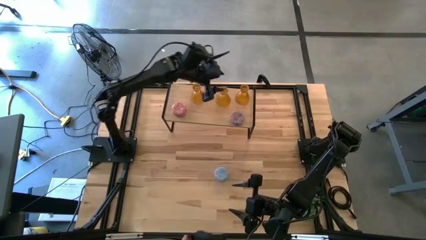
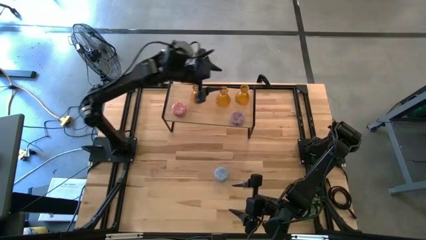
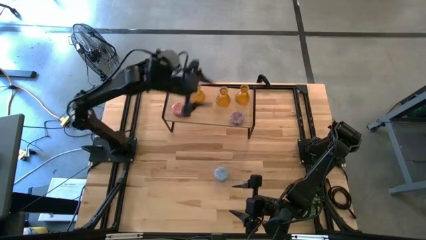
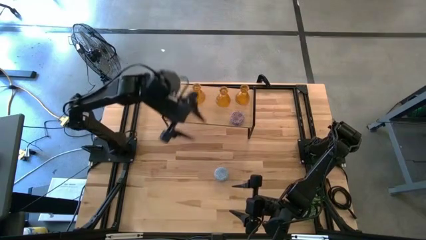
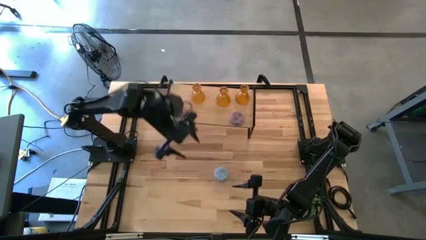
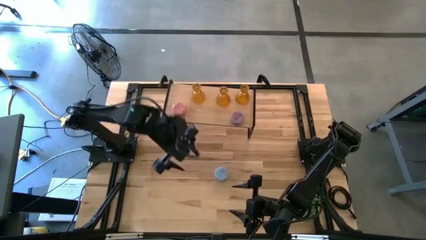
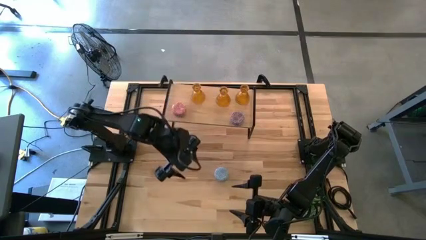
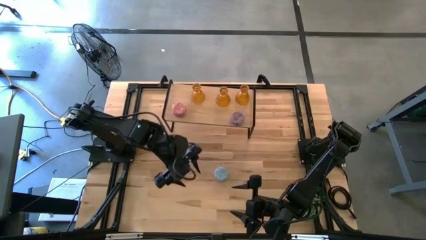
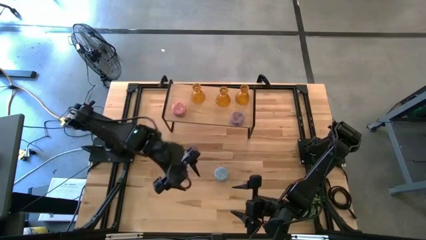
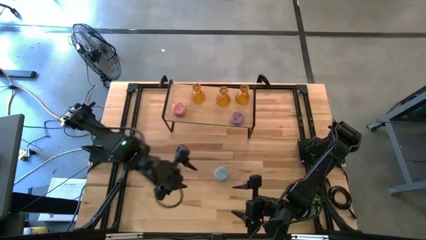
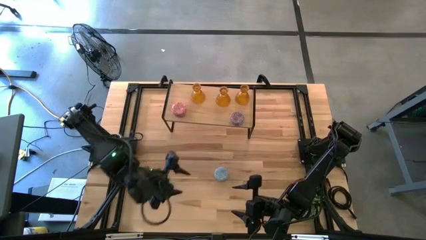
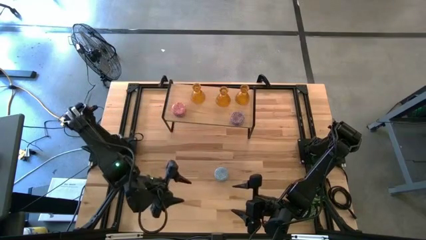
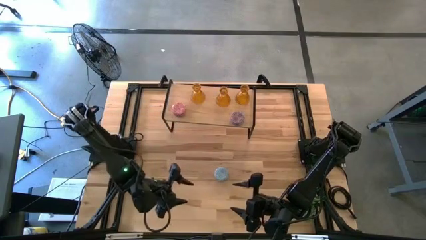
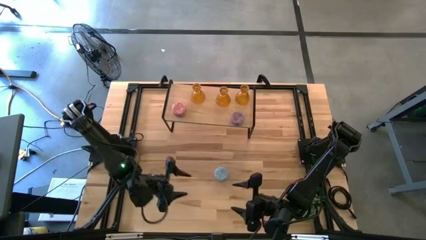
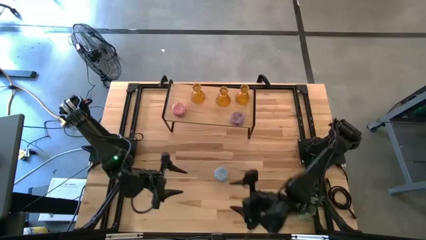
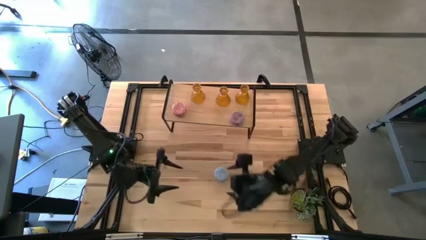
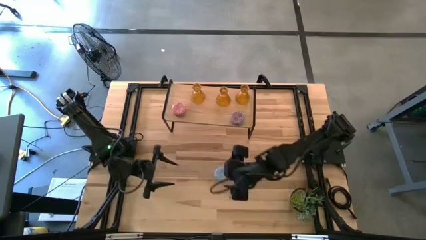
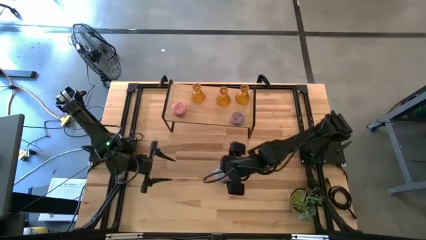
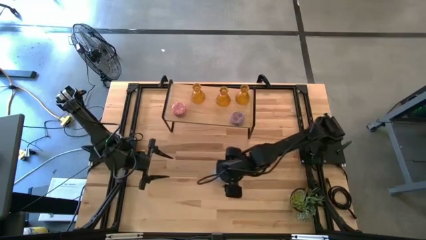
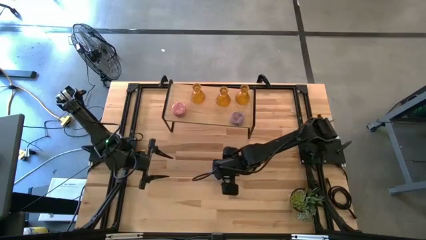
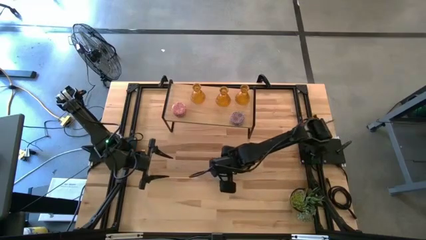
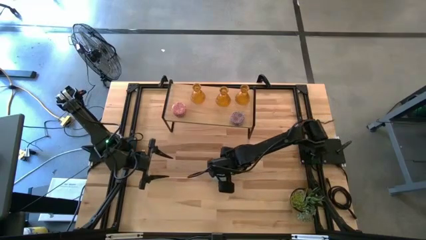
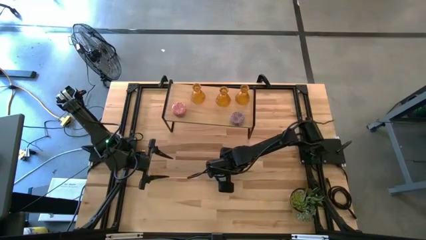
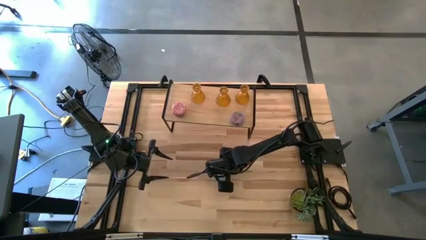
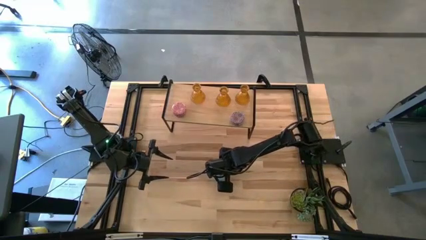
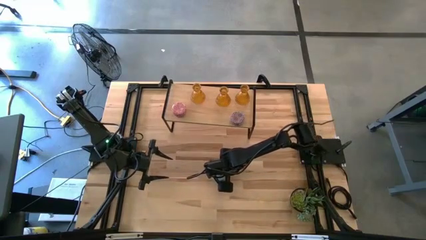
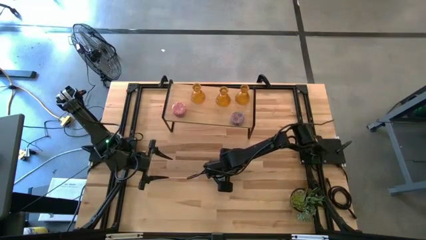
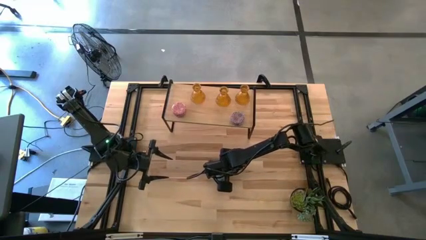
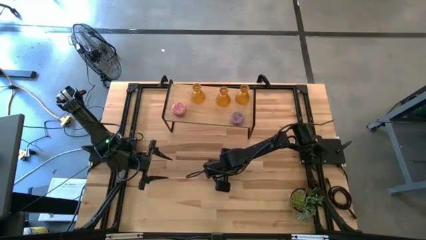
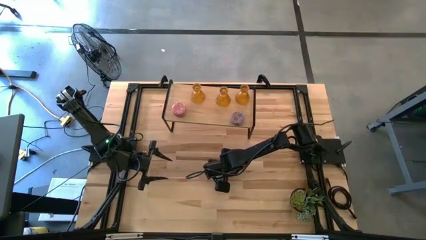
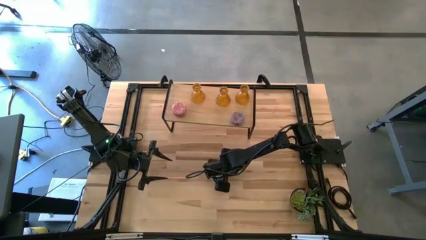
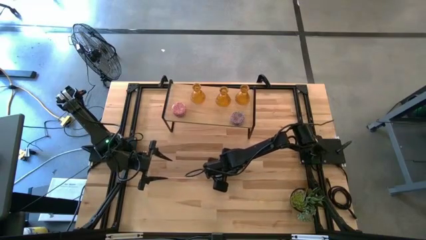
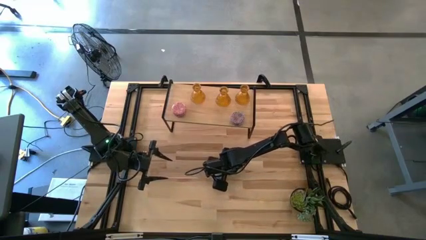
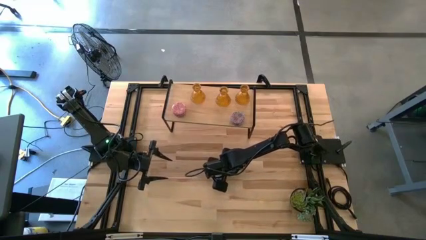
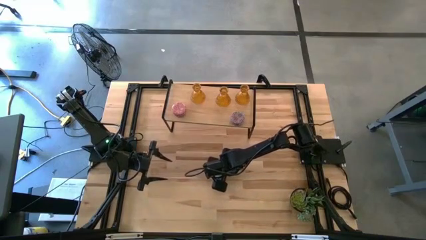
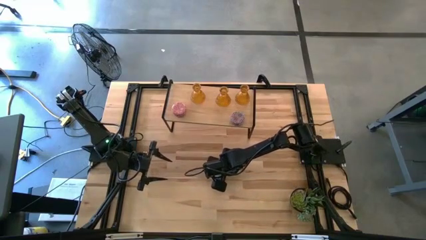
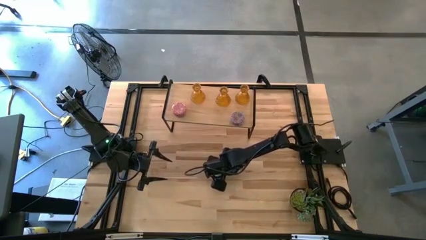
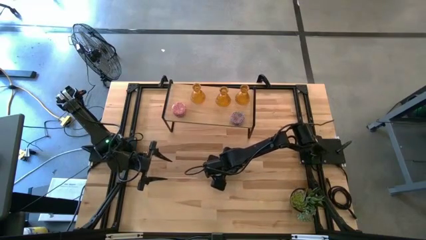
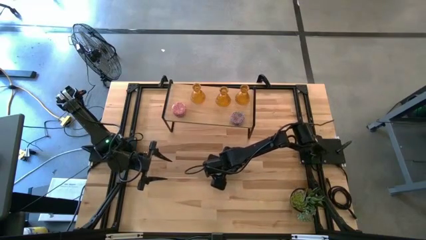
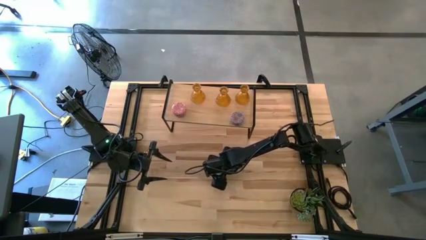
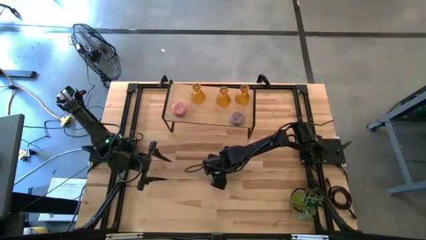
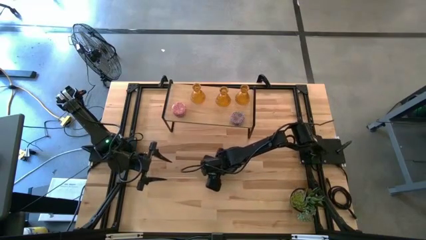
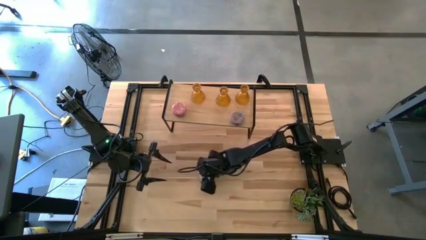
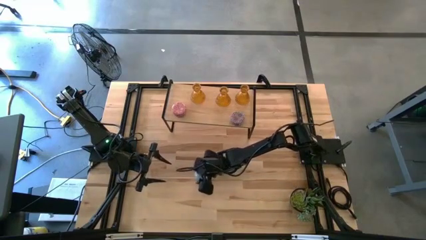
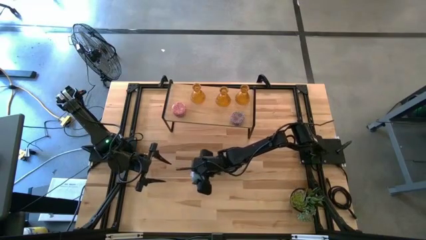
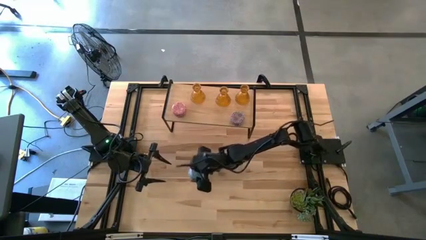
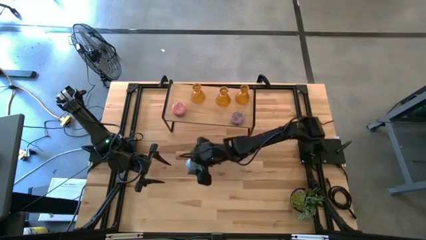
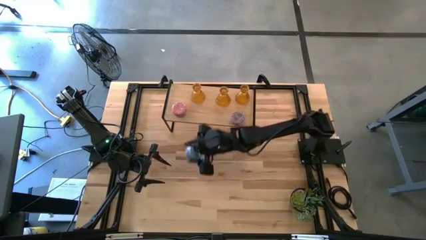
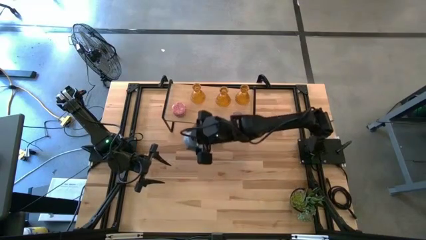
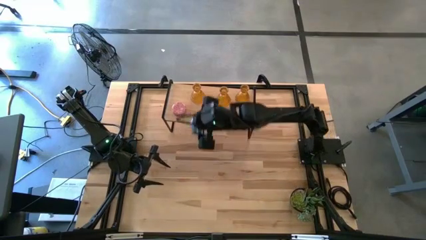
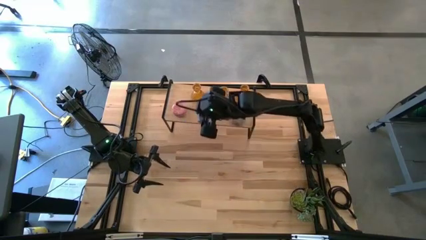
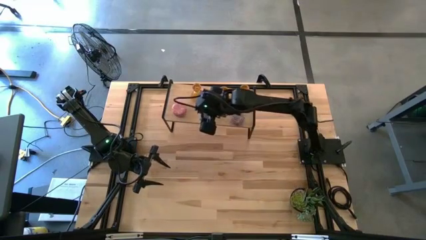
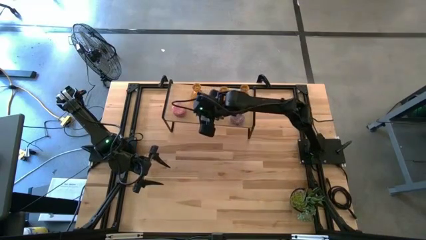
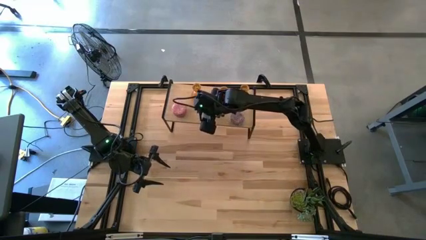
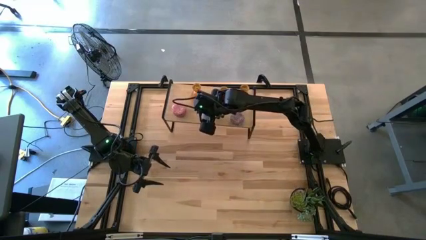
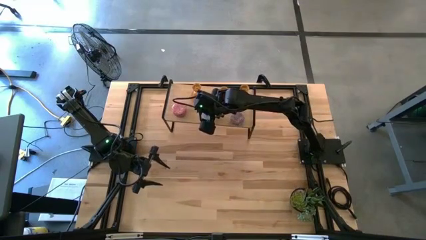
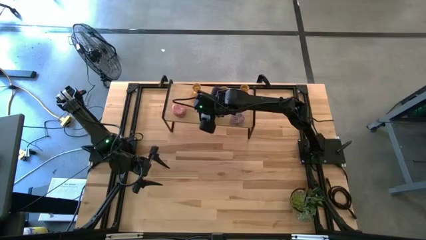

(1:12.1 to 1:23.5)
Task: Pick & Place candle stick holders
Put the blue scented candle on the shelf aligned with the other scented candle
